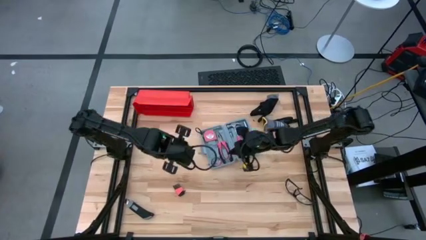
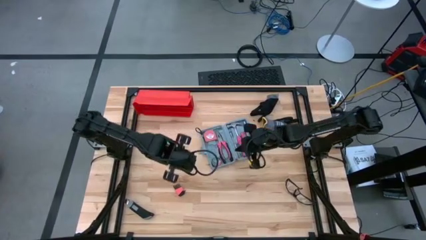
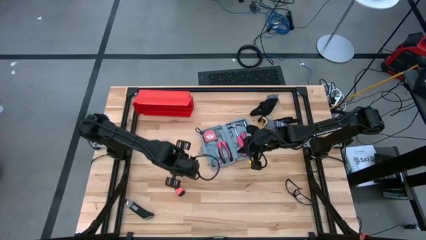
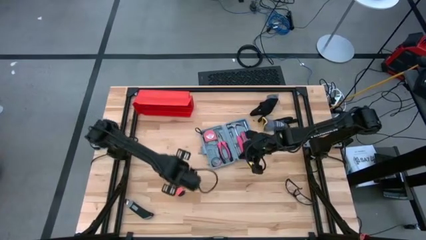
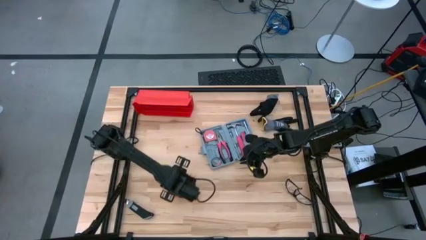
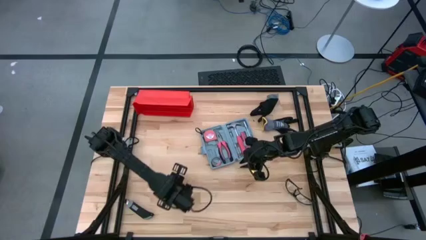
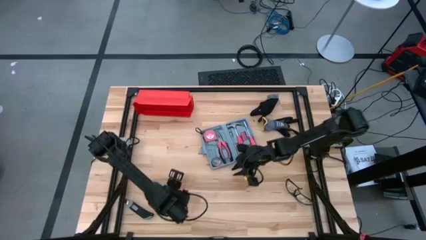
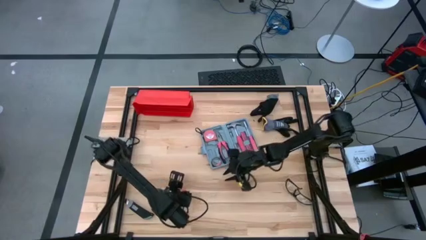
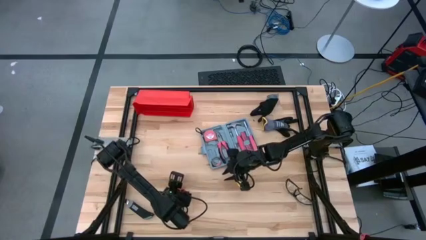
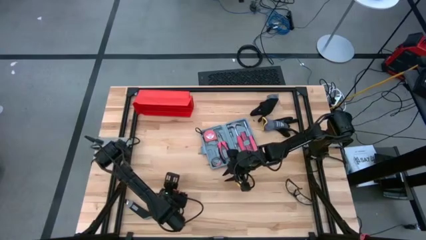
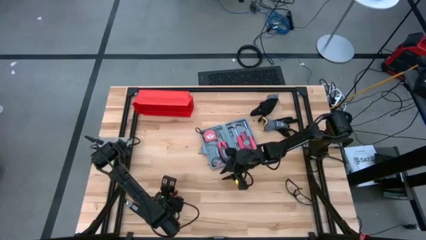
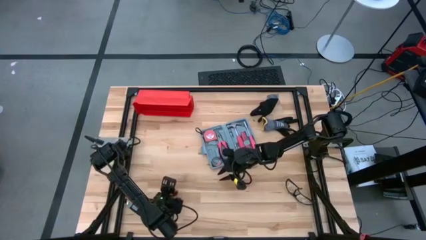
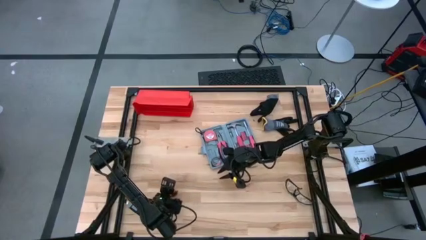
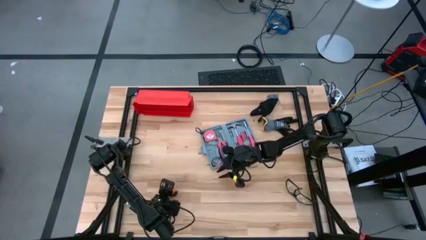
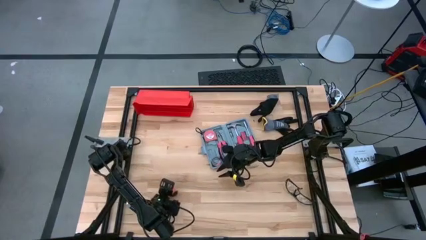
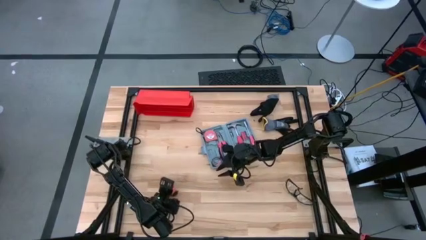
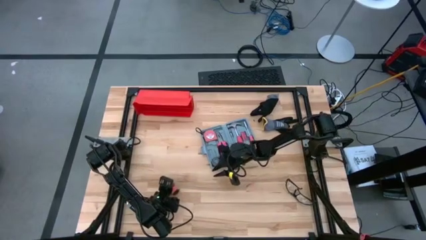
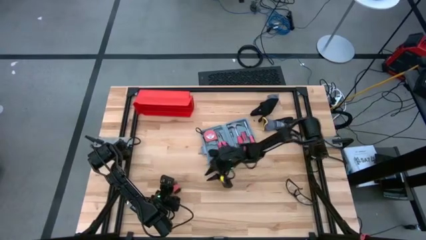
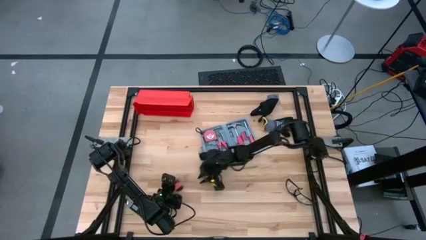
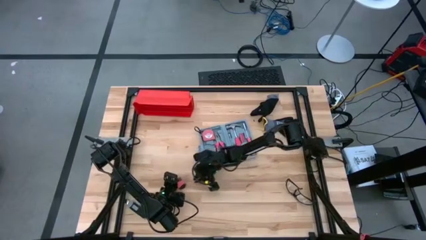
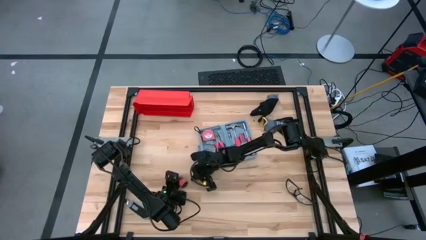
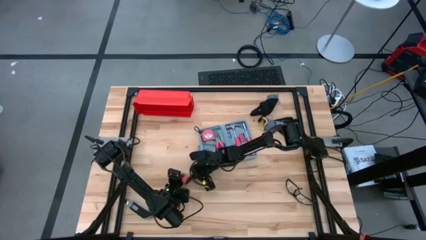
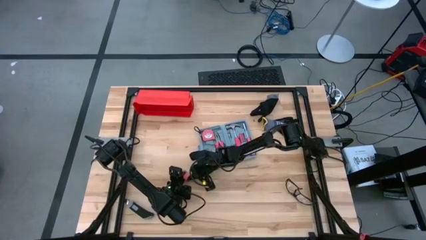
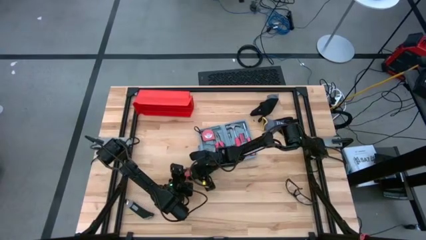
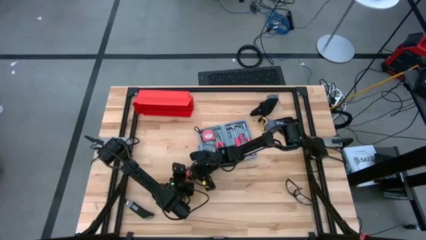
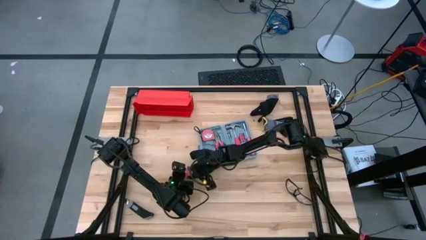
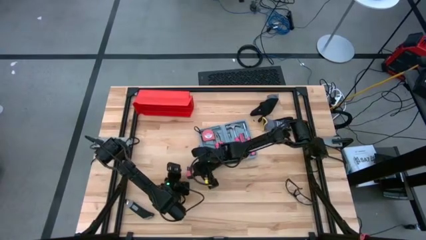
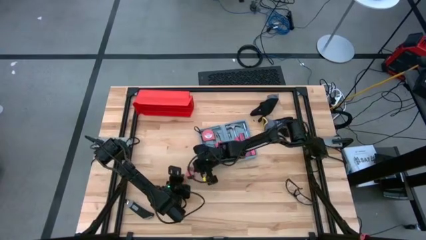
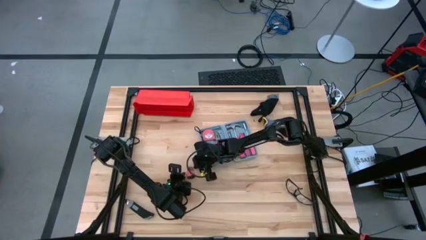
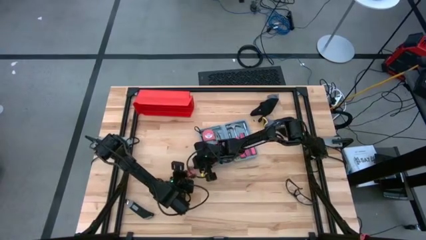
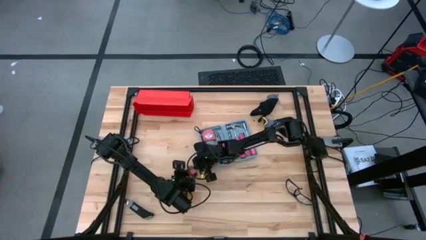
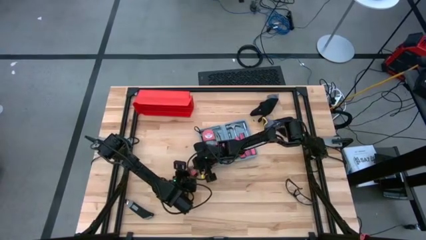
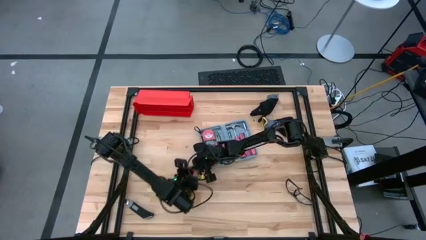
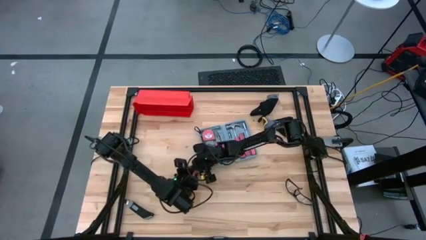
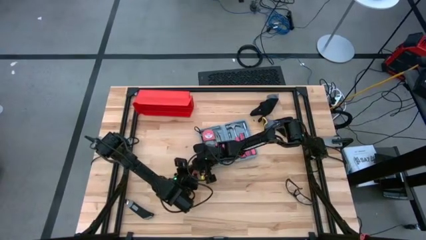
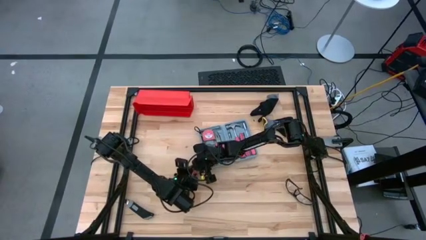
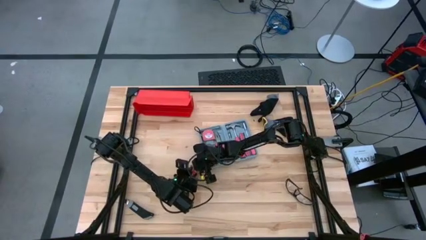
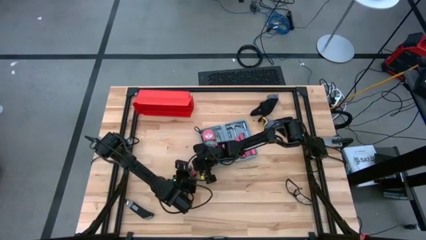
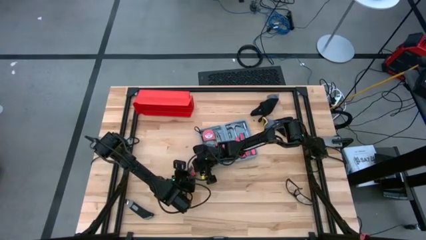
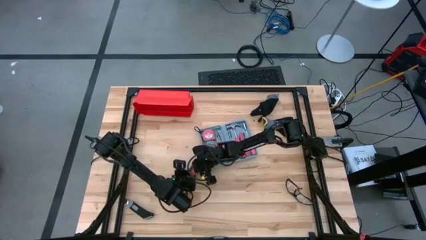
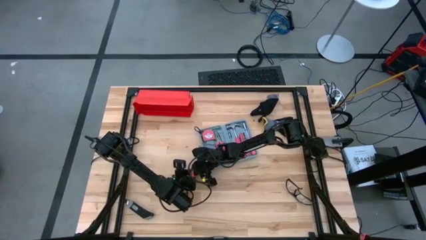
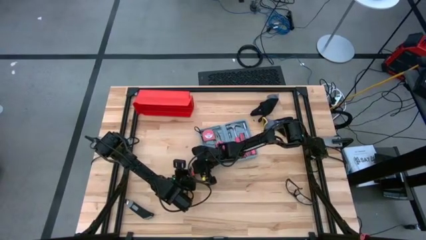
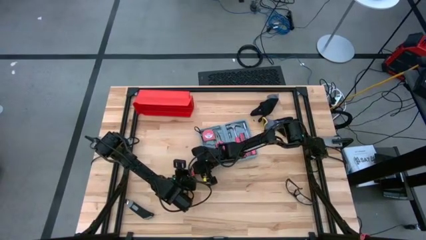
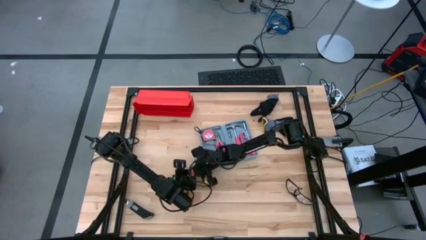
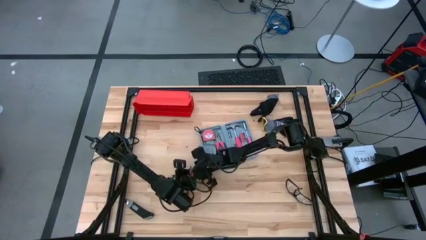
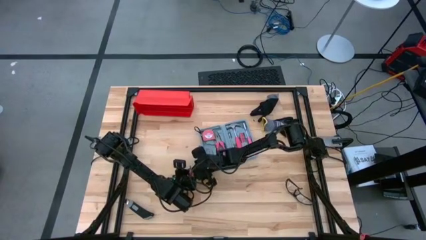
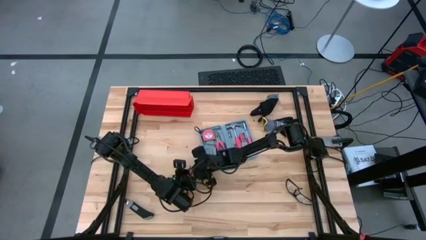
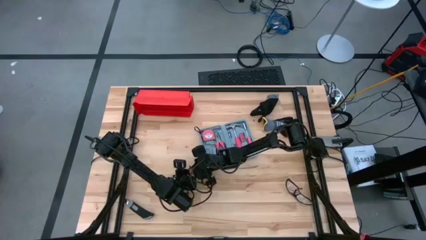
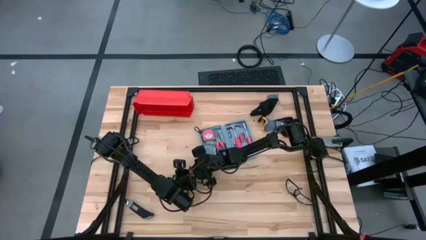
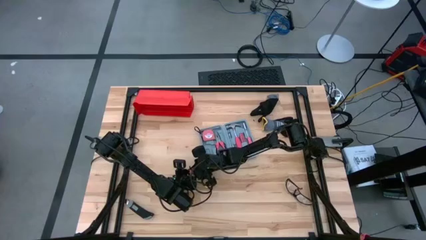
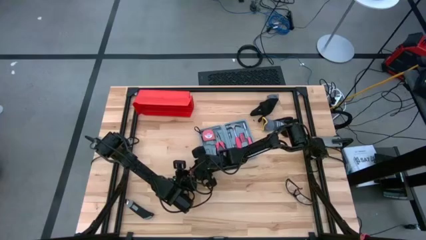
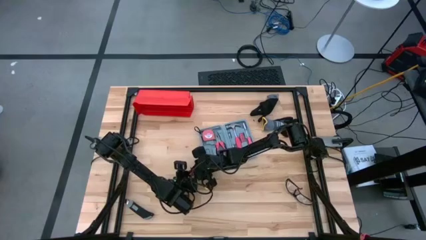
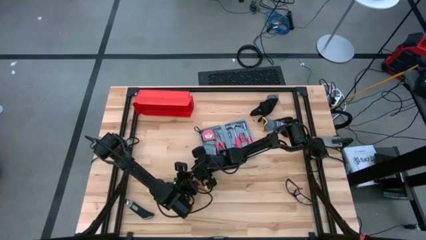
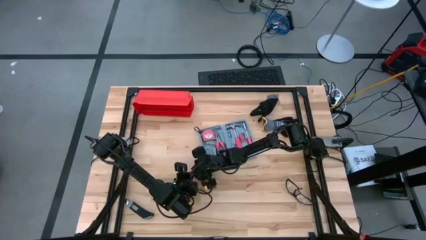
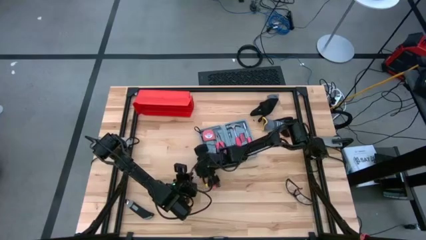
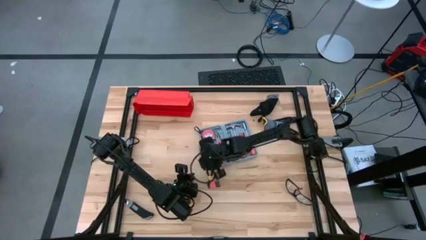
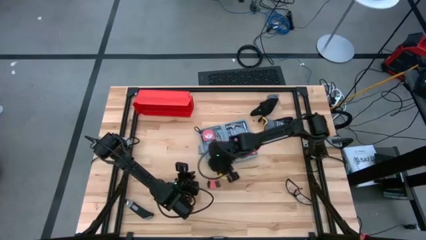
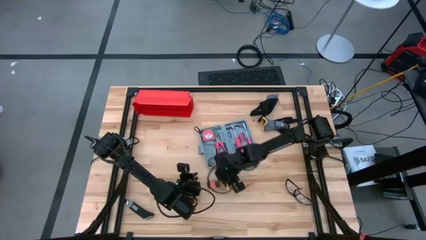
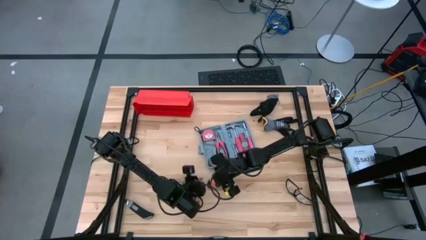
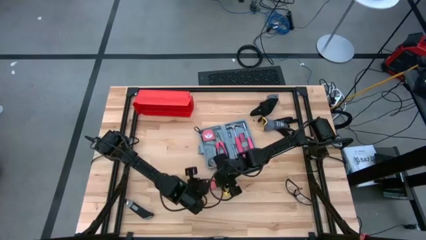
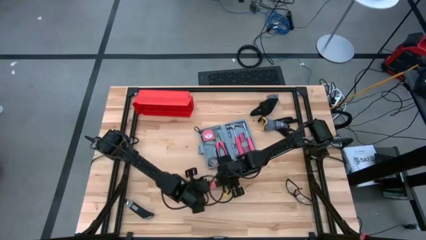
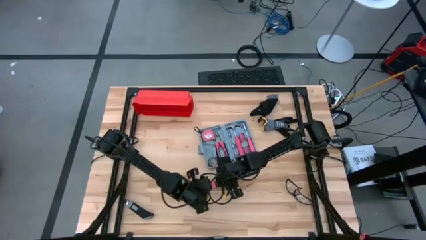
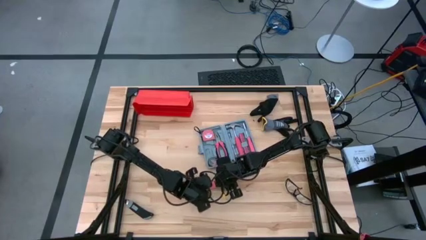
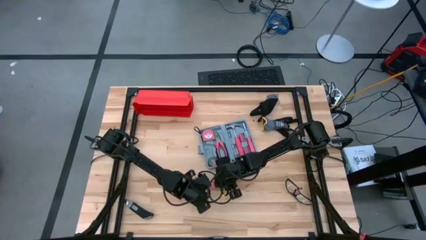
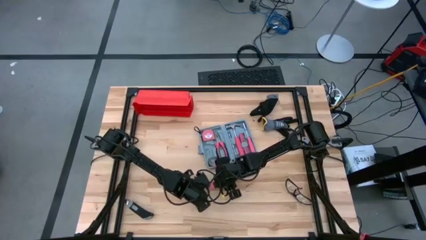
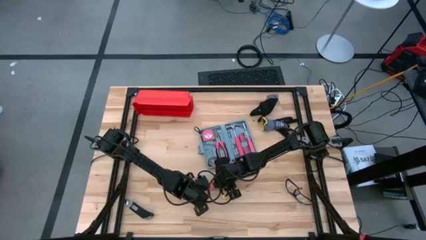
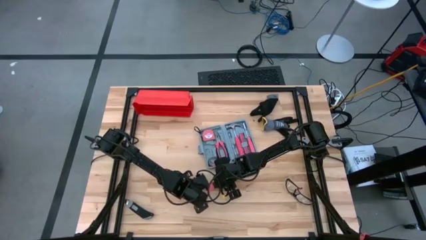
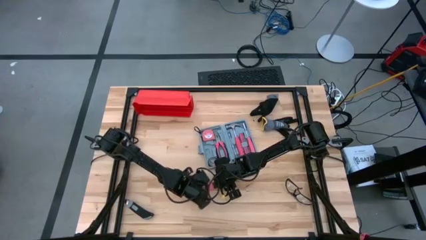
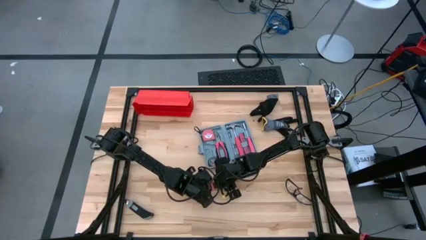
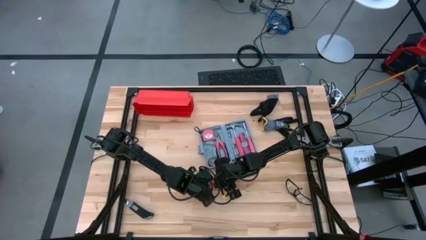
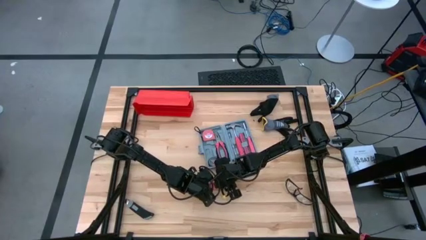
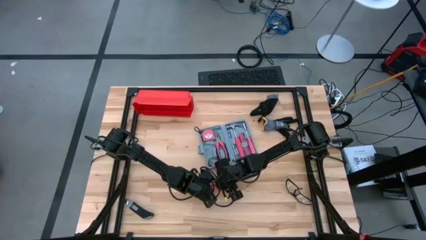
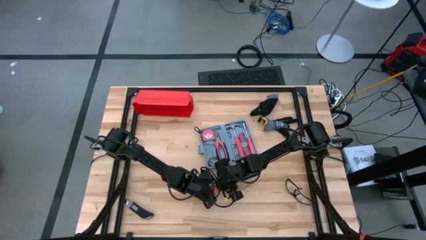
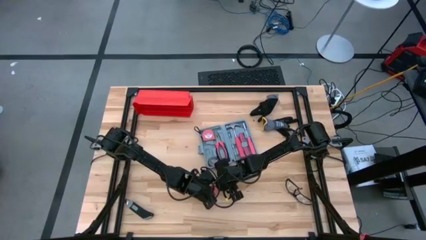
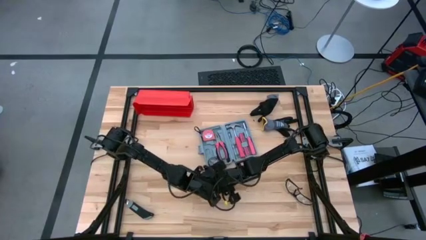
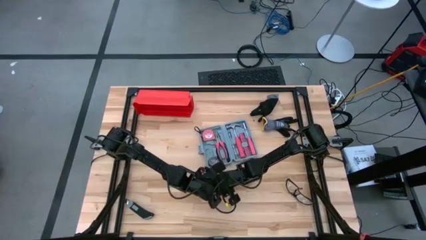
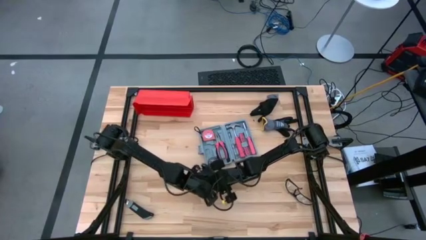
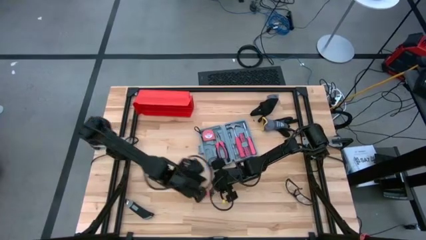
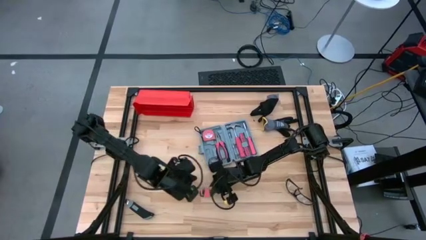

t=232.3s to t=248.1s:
Task: prefit tool cases
Put the orange hex key set into the gray pre-fit tool case

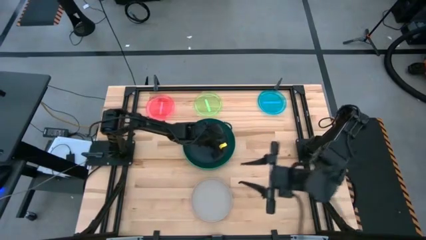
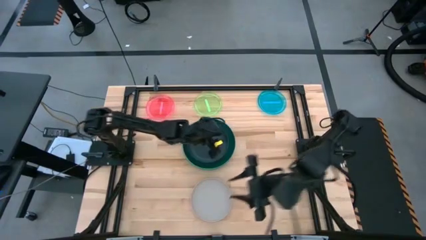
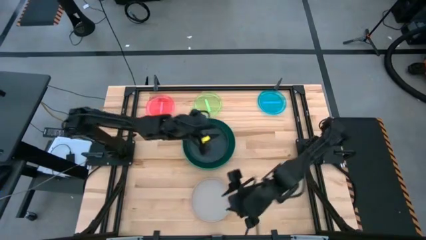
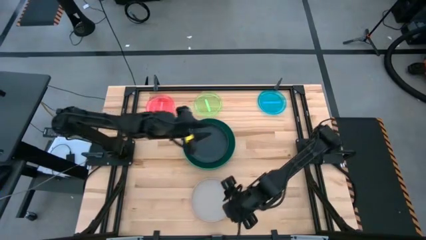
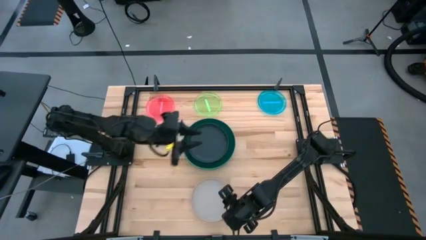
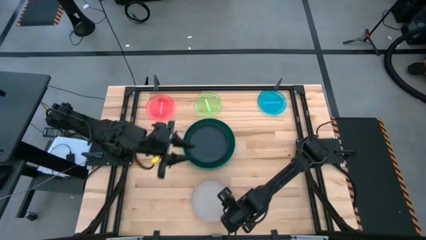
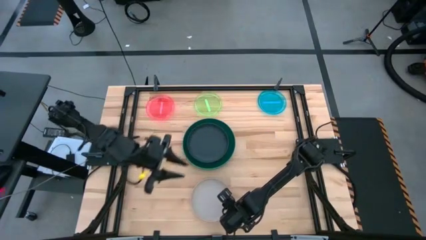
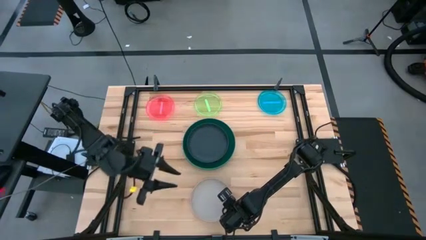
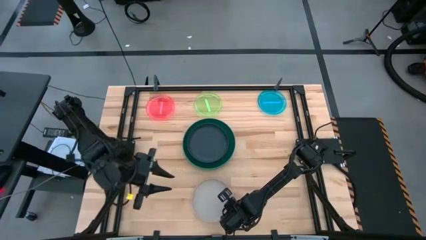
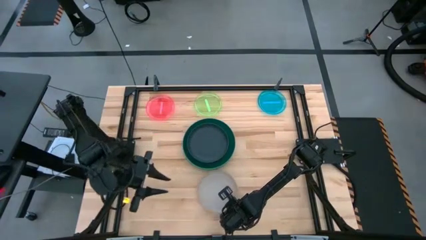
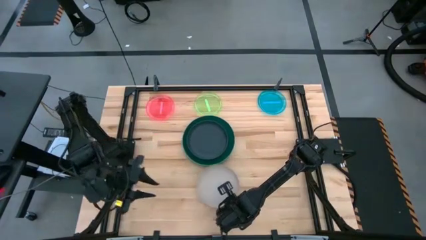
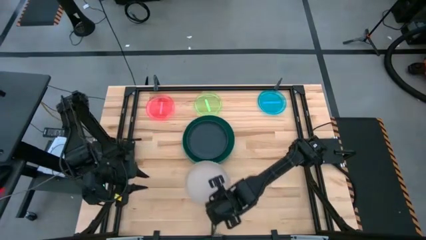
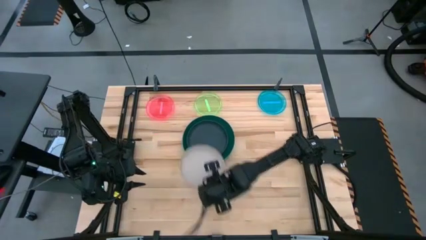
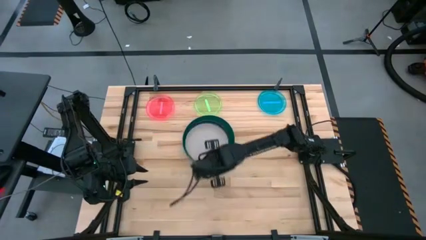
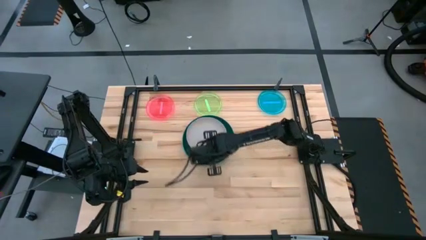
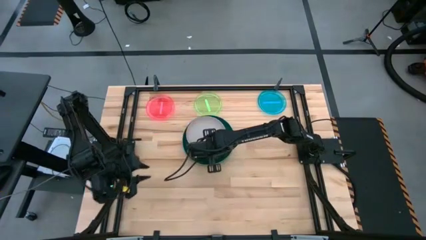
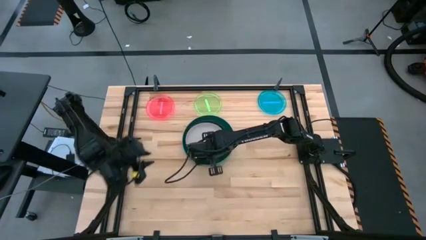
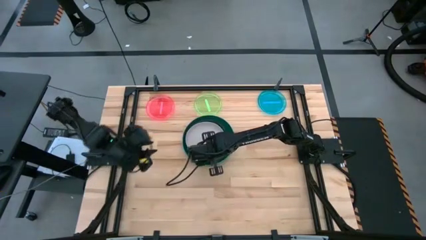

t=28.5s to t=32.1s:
Task: Stack plastic plates
Stack the gray plate on the black plate
